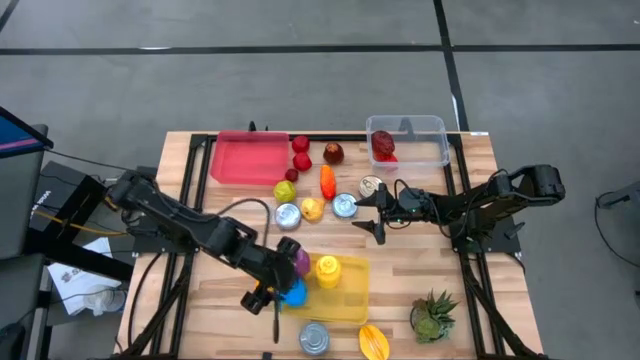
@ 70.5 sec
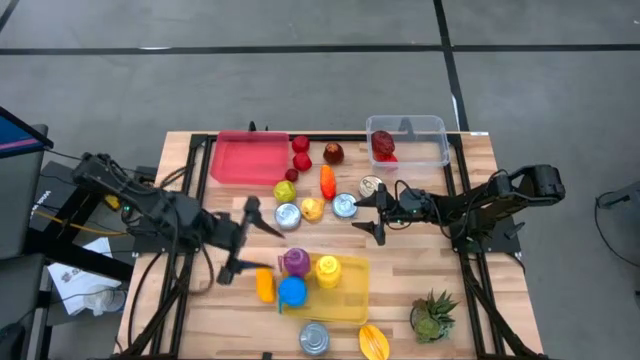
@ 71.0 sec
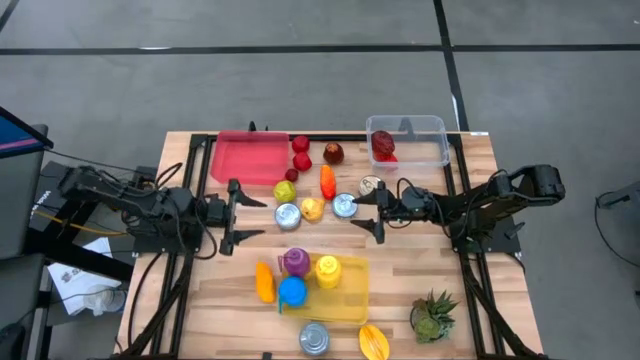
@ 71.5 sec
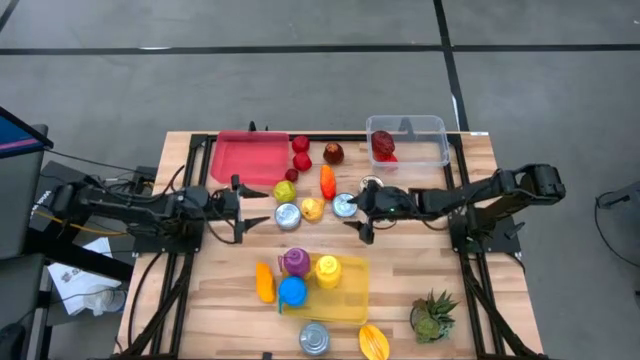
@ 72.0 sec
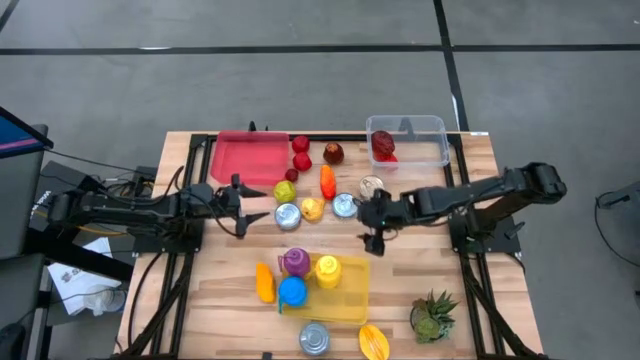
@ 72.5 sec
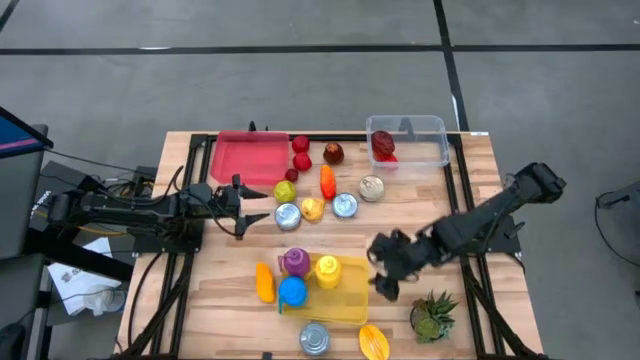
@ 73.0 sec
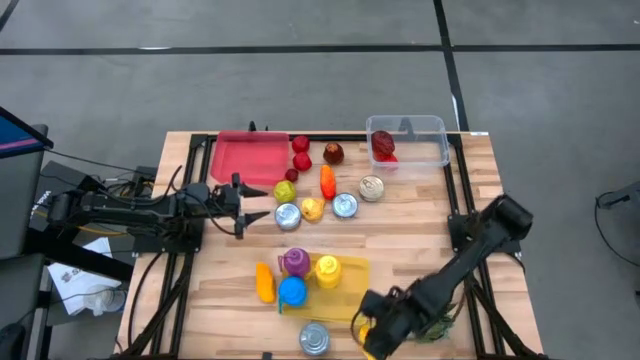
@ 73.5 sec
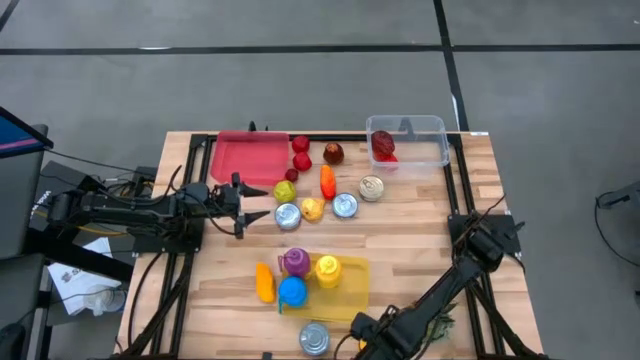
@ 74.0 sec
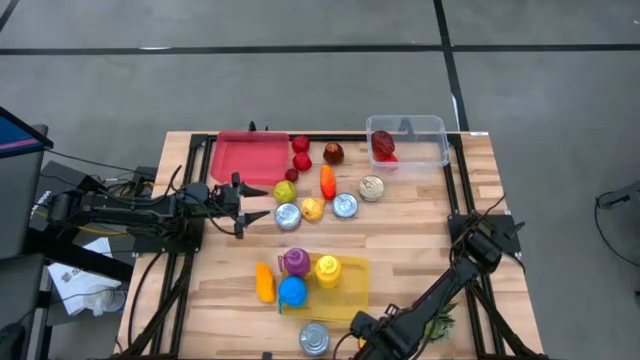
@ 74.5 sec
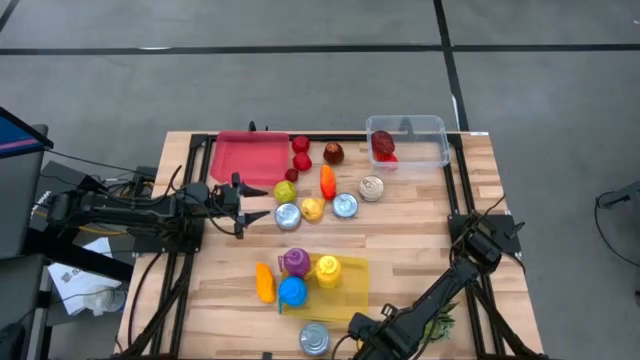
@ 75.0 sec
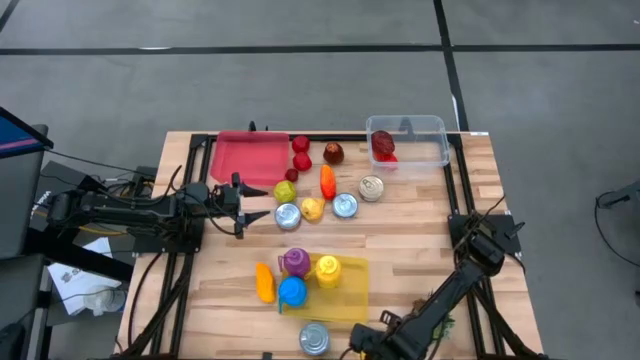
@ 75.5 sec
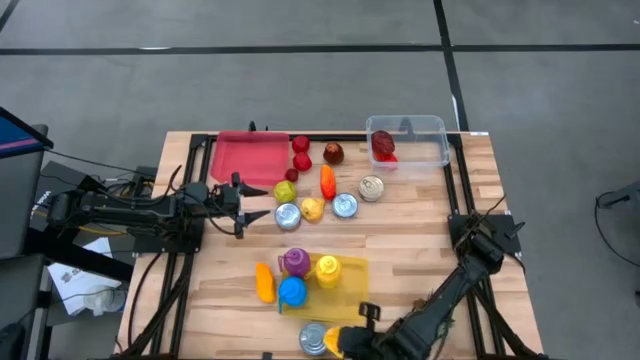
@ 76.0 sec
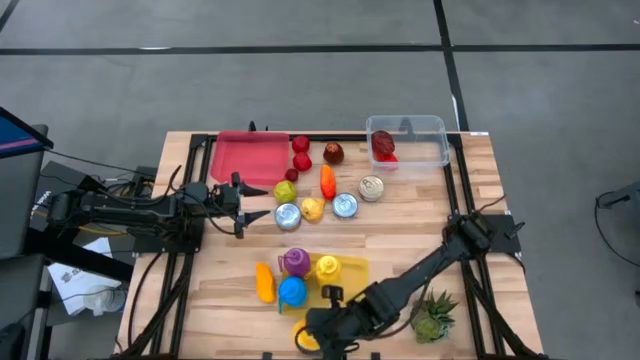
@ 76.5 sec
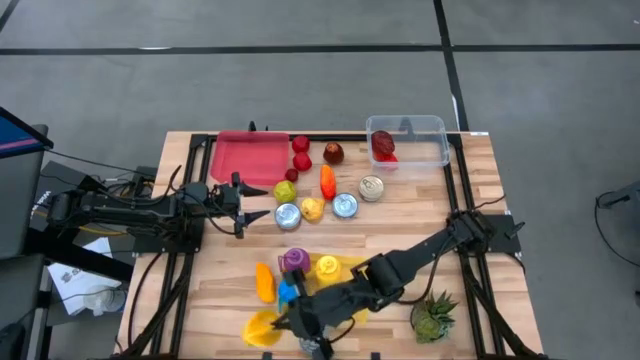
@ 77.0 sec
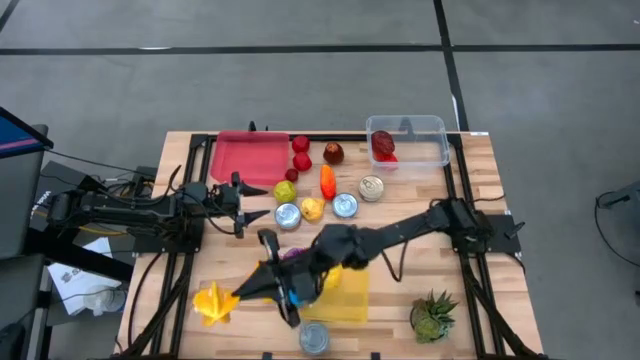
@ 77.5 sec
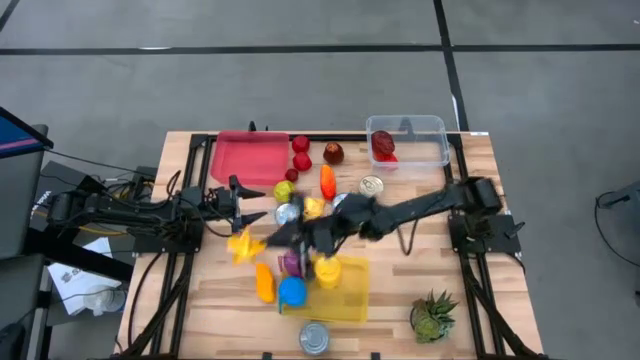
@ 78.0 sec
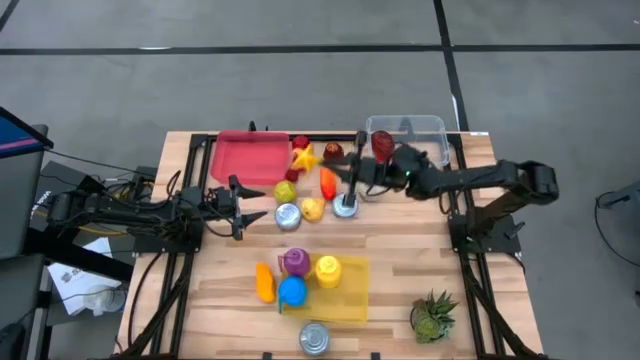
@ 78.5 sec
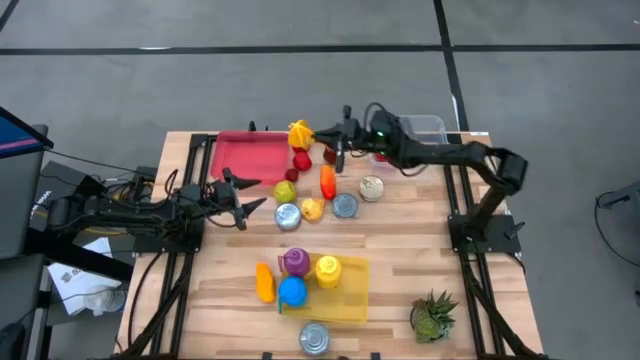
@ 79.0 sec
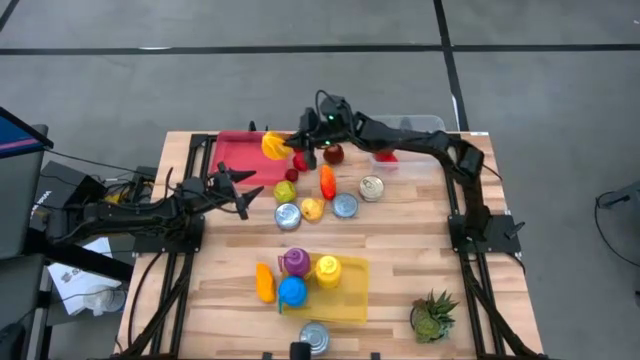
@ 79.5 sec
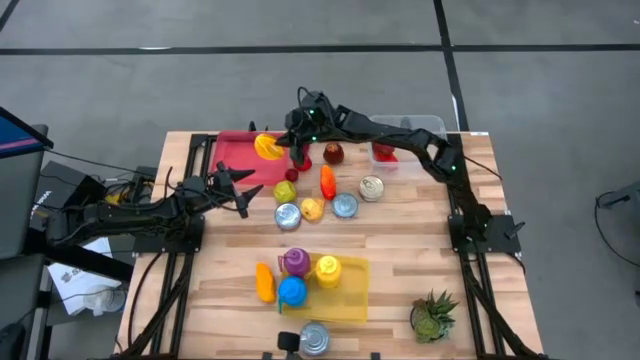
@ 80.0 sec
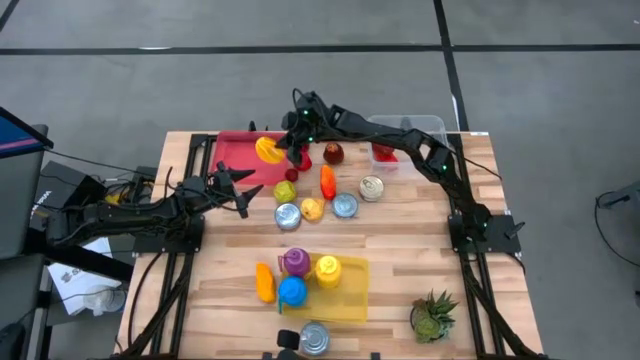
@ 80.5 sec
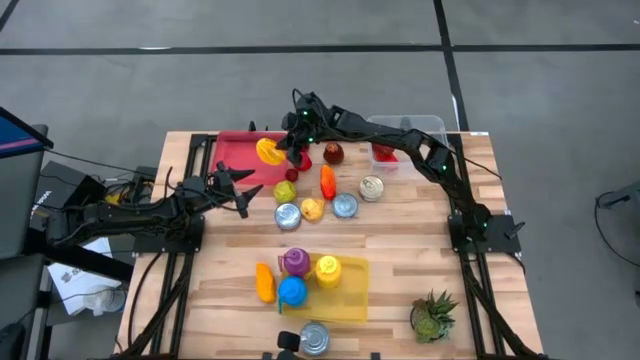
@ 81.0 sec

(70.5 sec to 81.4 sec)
Task: Pick & Place Food Item
Put the starfruit into the red bin

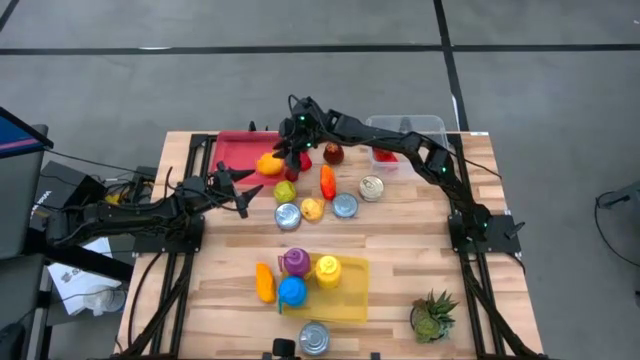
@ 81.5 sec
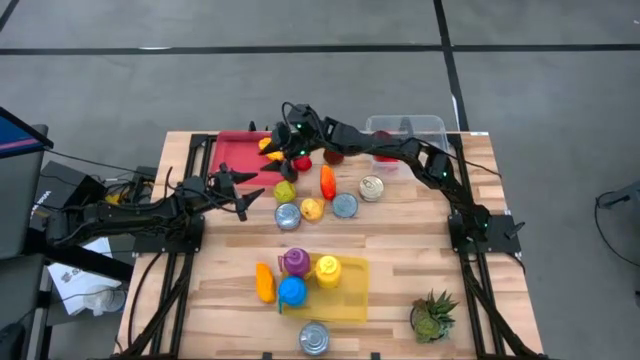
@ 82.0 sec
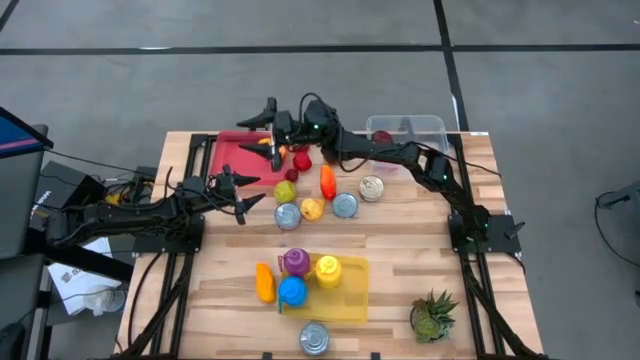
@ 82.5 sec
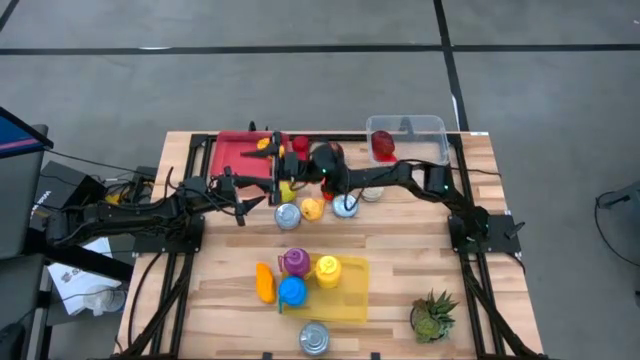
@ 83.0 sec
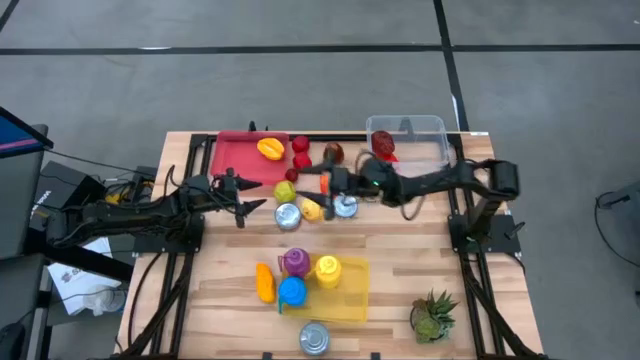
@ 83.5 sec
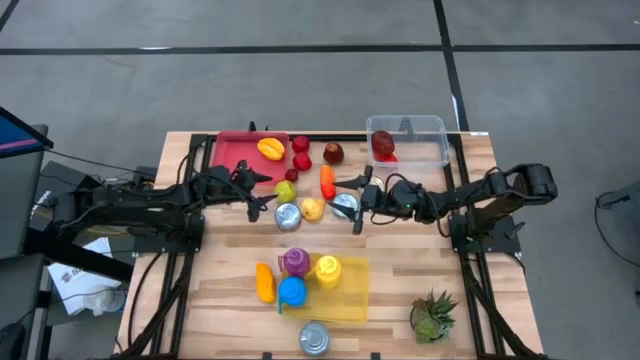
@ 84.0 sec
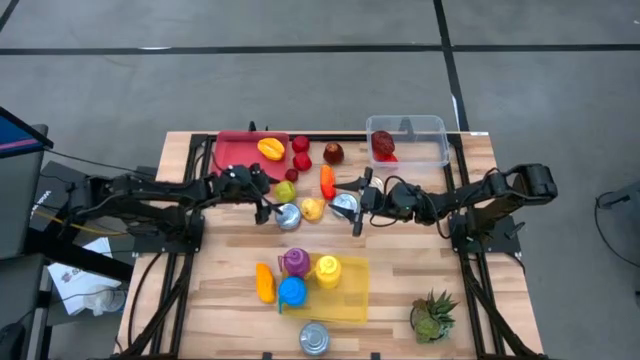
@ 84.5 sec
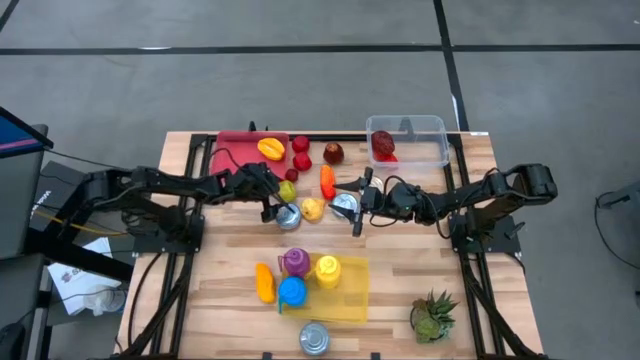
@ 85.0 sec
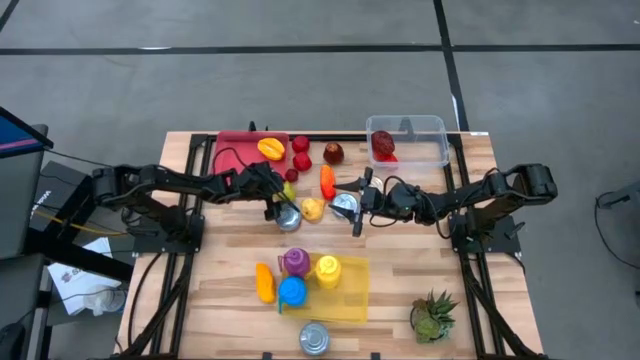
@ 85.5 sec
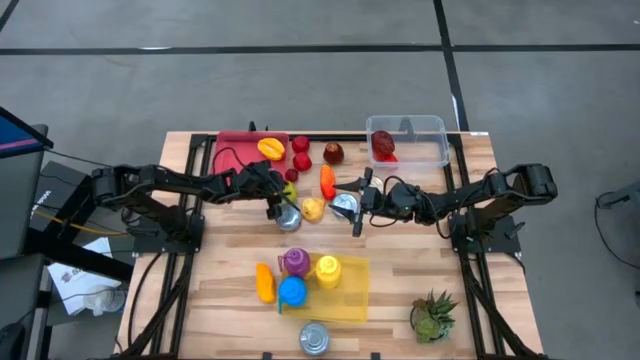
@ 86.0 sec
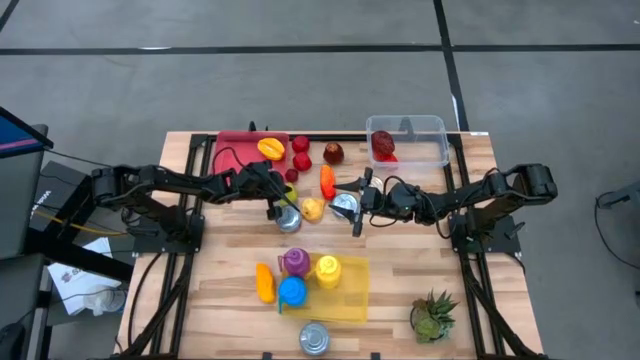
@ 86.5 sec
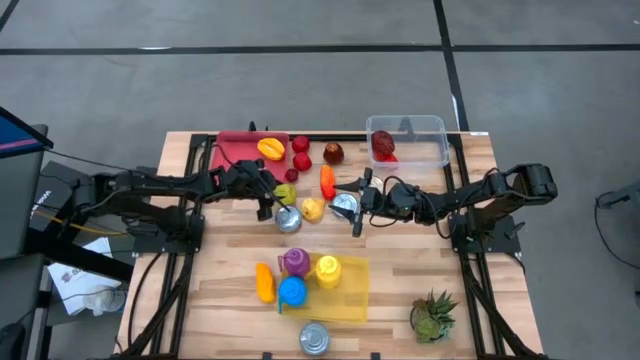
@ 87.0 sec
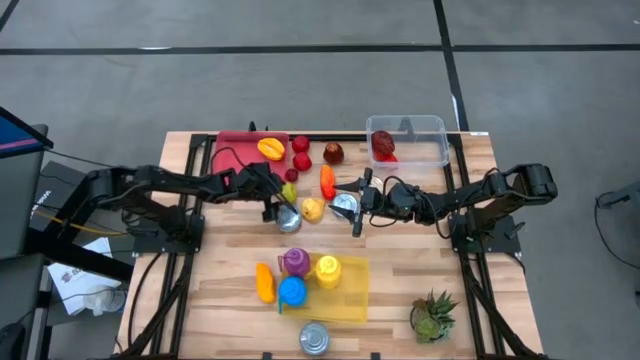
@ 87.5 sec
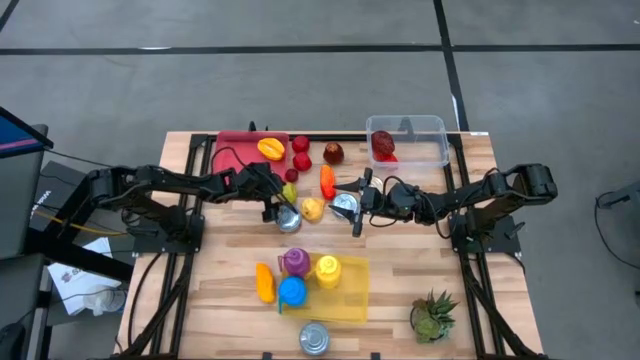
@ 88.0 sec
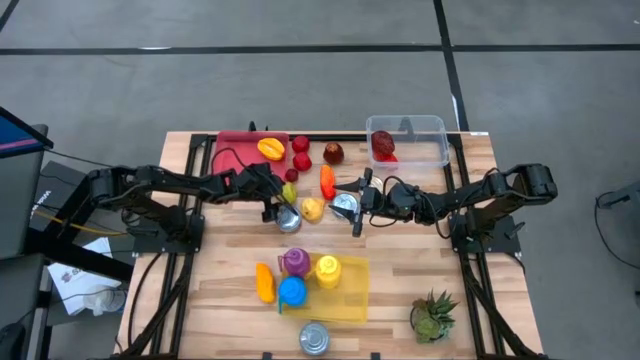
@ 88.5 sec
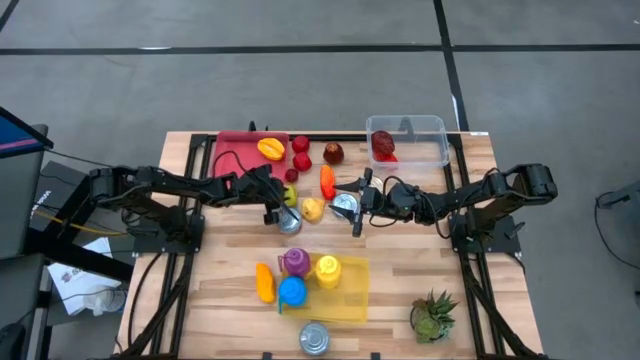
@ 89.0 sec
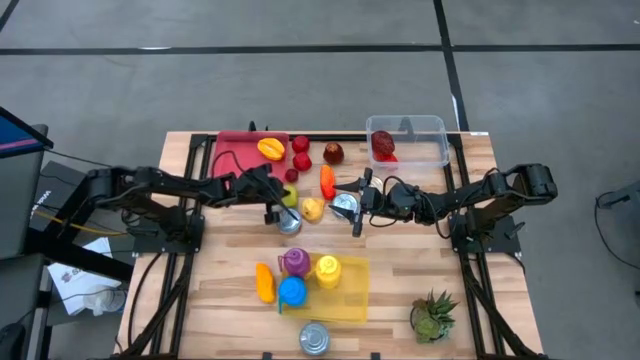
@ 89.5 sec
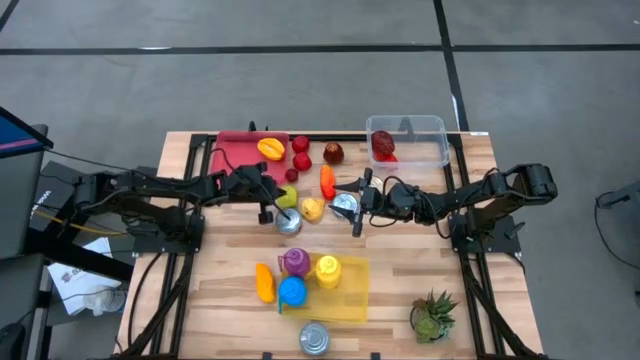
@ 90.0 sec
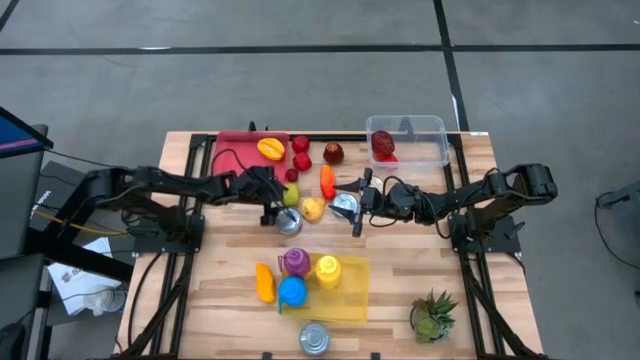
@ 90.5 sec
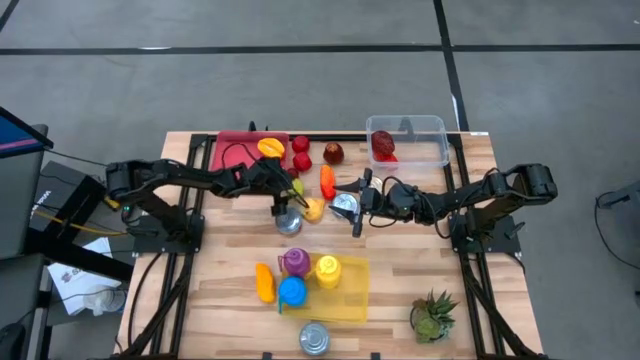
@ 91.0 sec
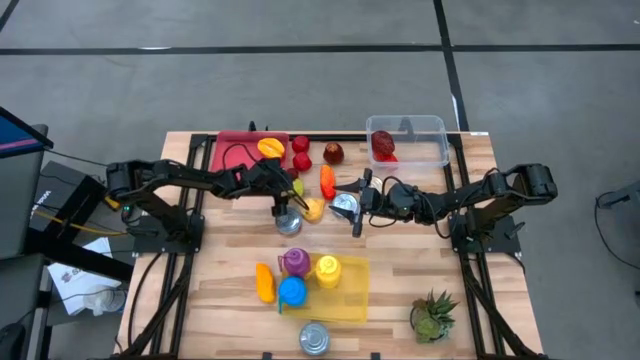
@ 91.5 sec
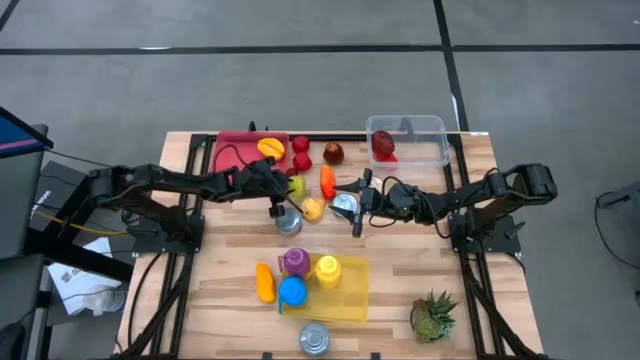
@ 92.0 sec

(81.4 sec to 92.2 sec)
Put the green apple into the red bin
